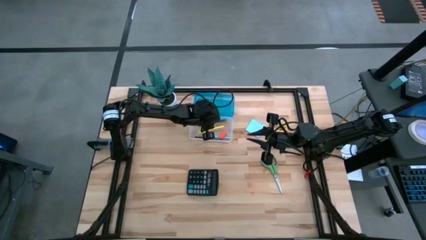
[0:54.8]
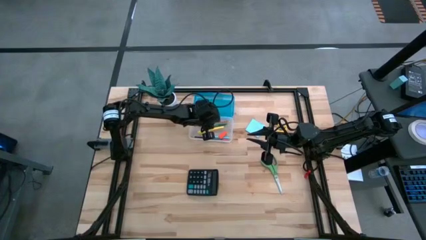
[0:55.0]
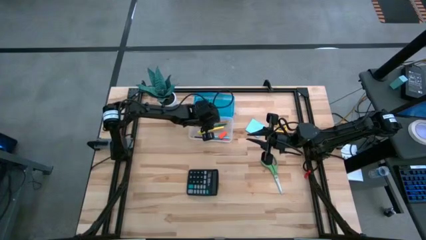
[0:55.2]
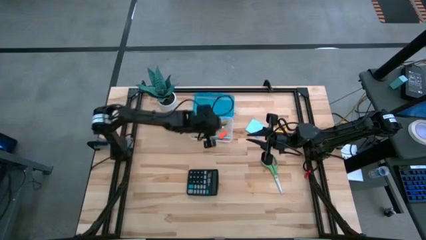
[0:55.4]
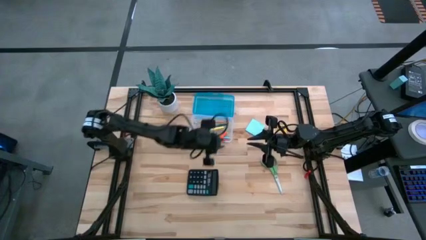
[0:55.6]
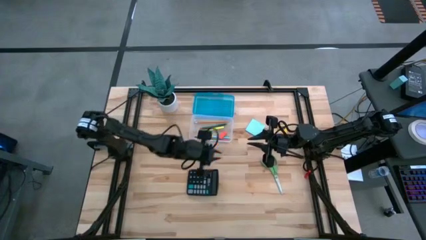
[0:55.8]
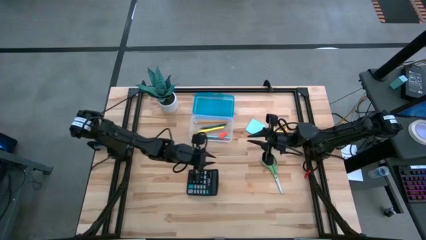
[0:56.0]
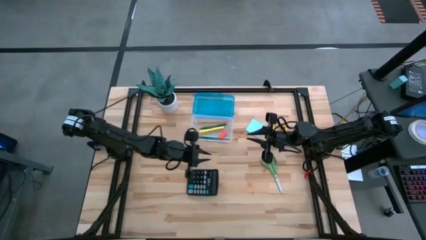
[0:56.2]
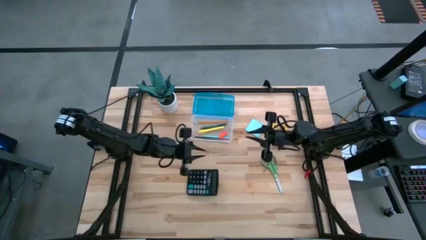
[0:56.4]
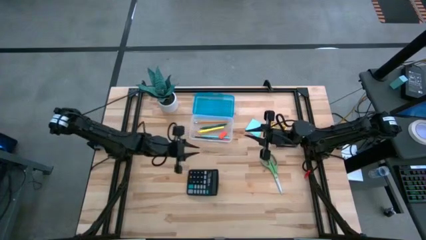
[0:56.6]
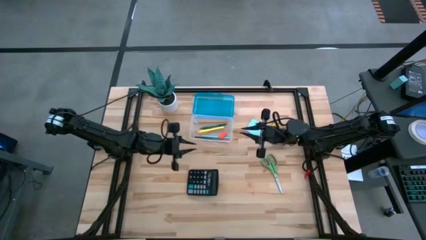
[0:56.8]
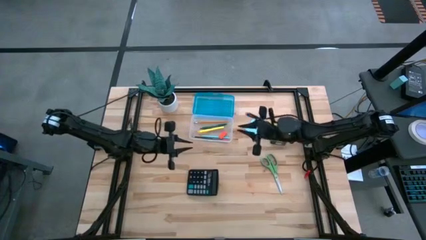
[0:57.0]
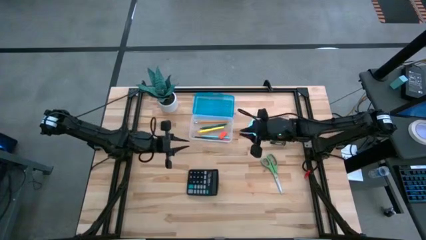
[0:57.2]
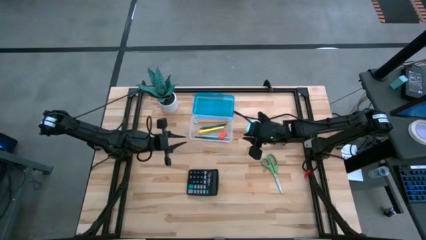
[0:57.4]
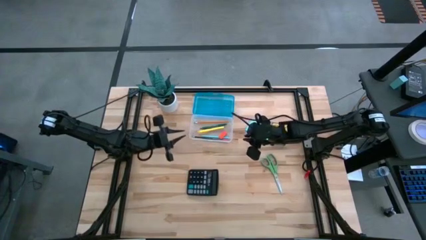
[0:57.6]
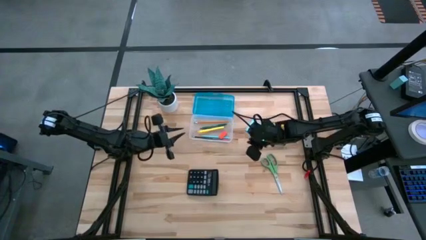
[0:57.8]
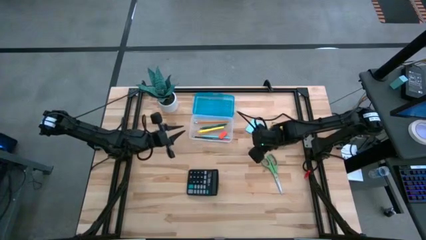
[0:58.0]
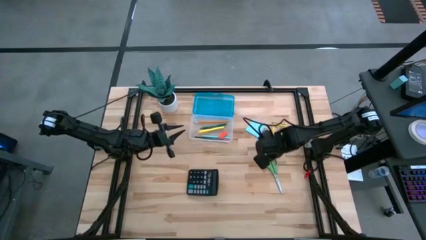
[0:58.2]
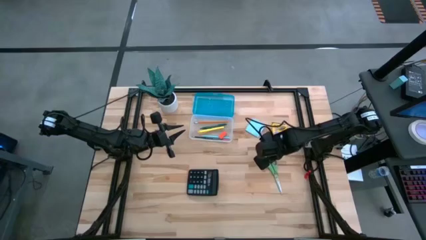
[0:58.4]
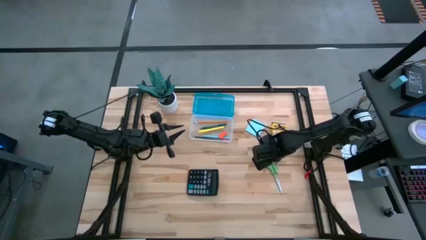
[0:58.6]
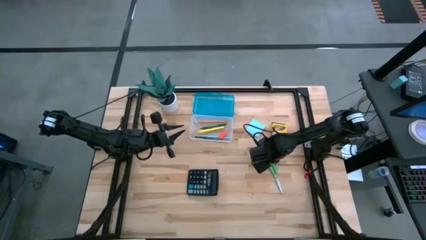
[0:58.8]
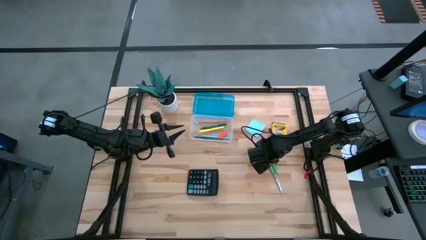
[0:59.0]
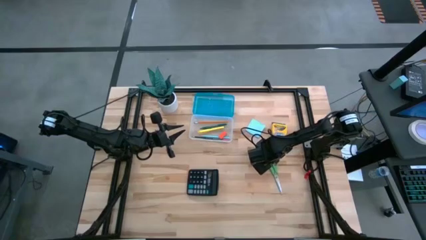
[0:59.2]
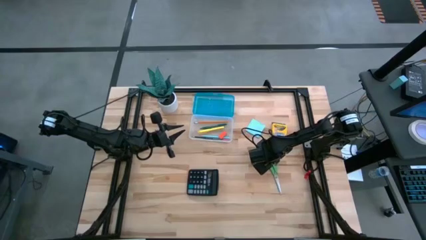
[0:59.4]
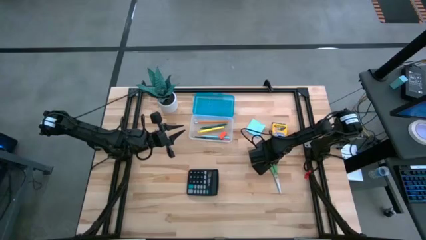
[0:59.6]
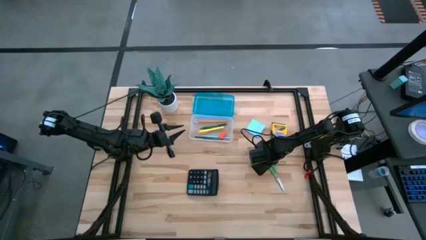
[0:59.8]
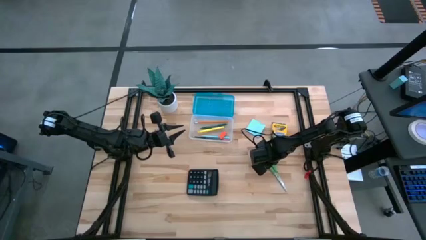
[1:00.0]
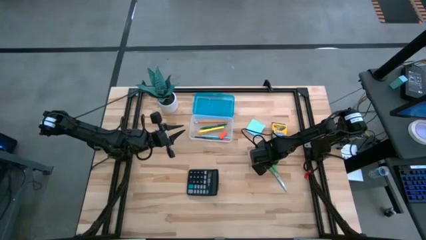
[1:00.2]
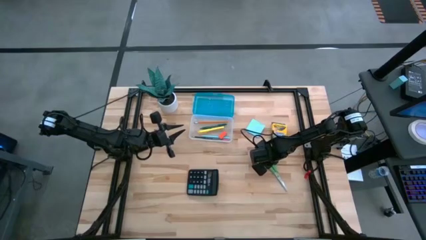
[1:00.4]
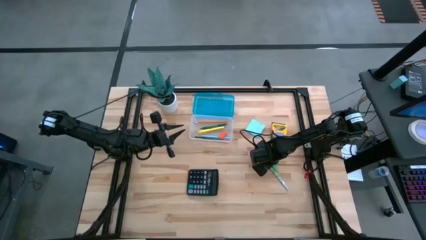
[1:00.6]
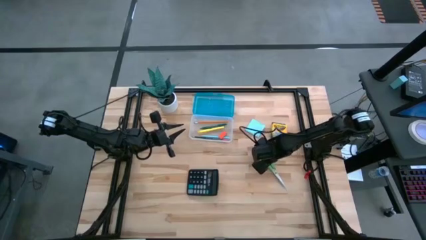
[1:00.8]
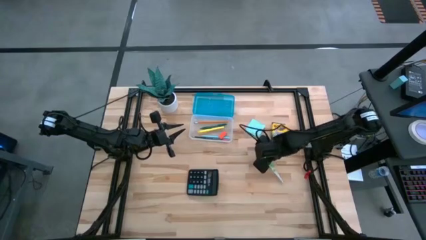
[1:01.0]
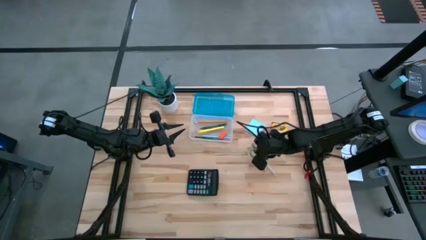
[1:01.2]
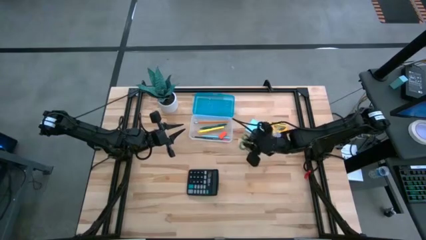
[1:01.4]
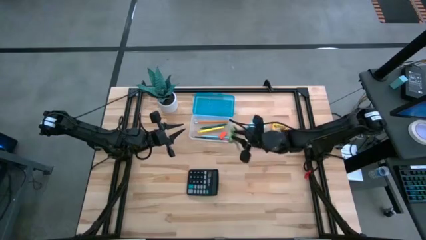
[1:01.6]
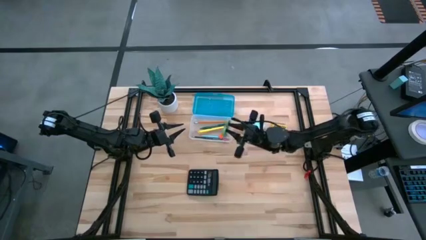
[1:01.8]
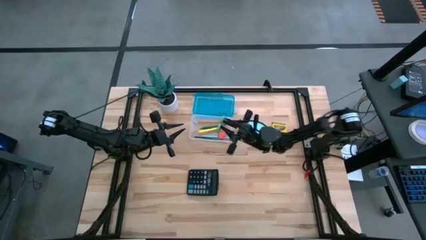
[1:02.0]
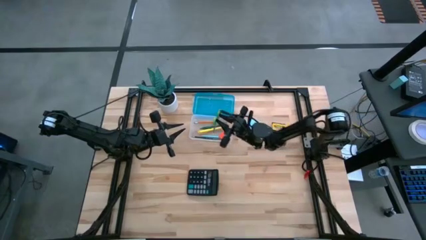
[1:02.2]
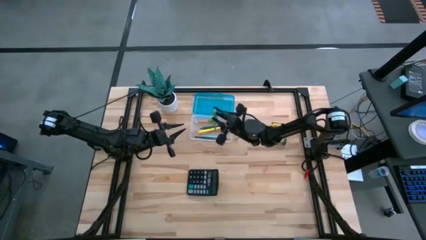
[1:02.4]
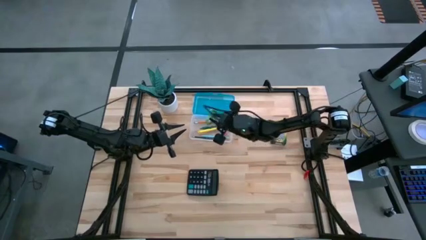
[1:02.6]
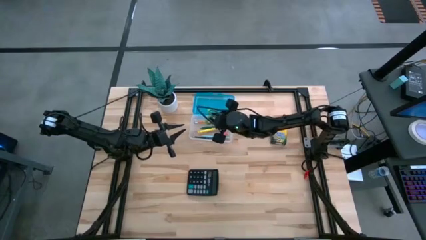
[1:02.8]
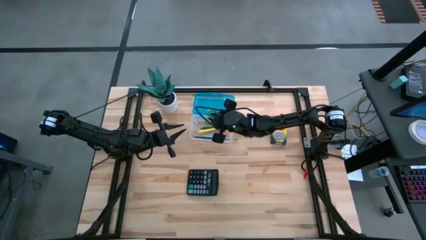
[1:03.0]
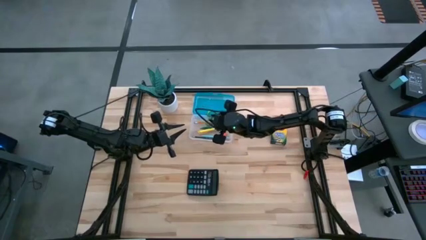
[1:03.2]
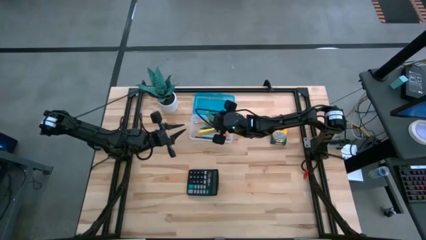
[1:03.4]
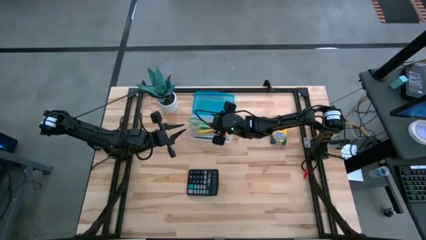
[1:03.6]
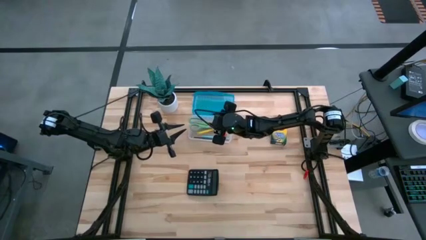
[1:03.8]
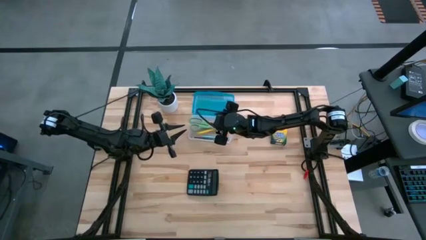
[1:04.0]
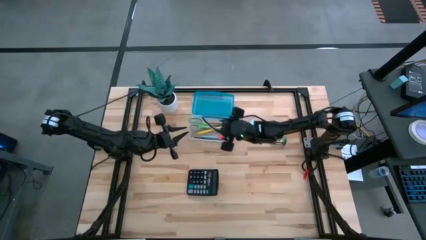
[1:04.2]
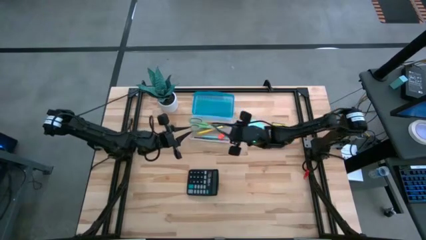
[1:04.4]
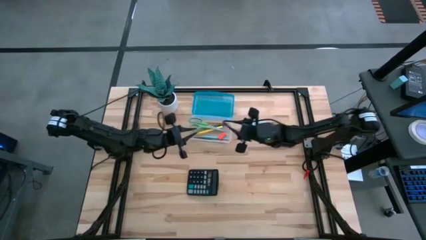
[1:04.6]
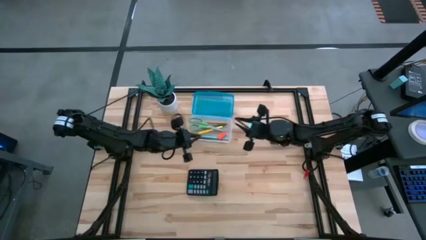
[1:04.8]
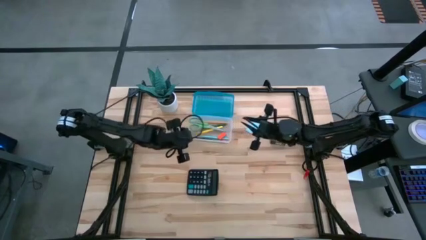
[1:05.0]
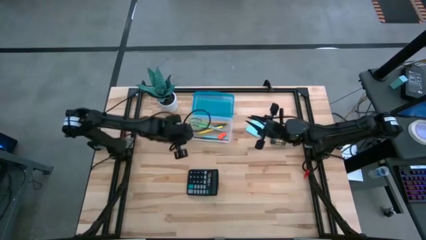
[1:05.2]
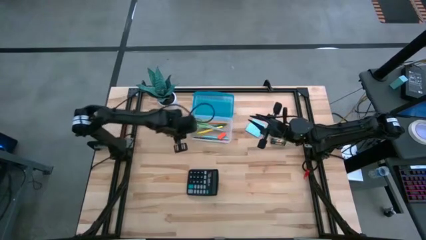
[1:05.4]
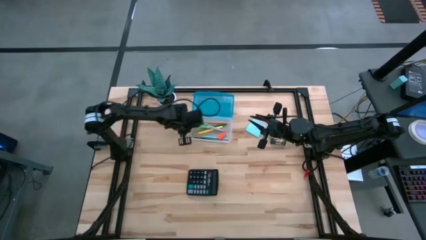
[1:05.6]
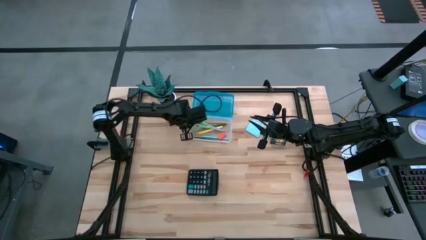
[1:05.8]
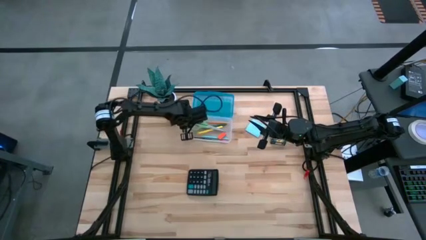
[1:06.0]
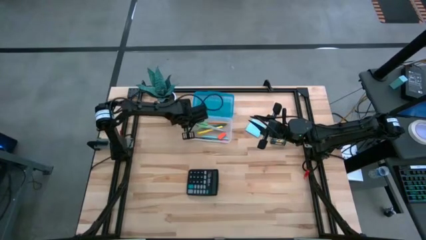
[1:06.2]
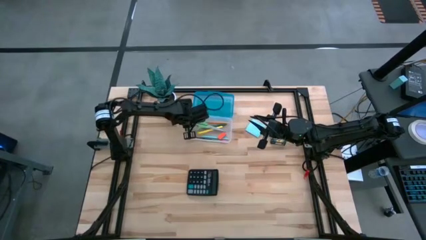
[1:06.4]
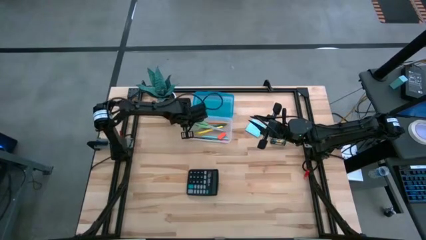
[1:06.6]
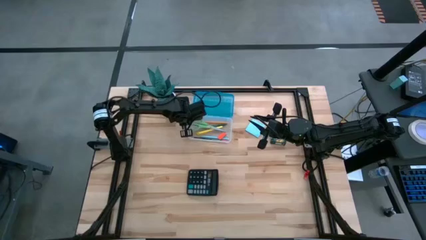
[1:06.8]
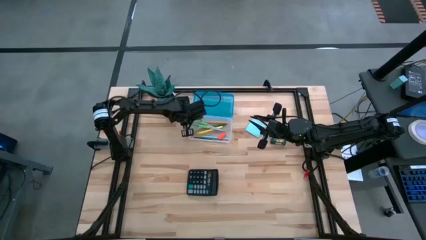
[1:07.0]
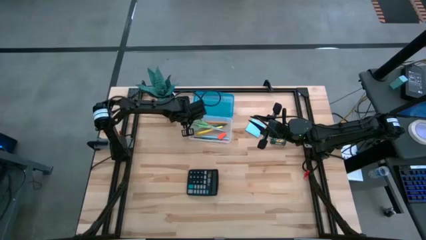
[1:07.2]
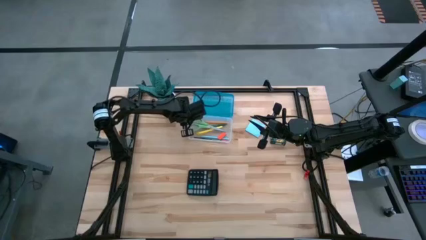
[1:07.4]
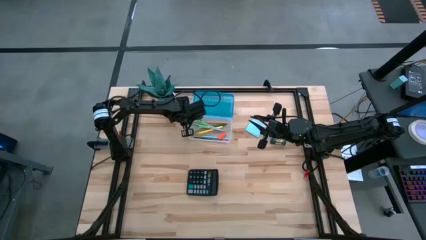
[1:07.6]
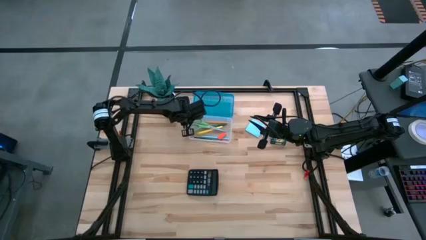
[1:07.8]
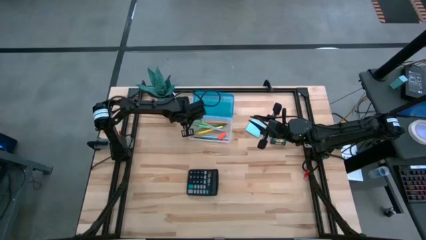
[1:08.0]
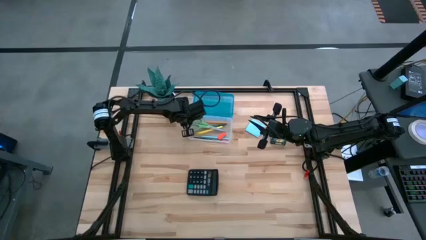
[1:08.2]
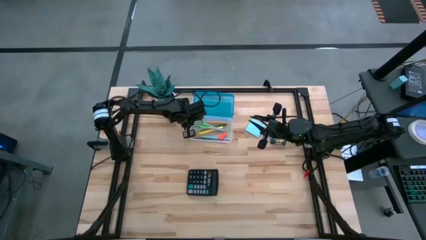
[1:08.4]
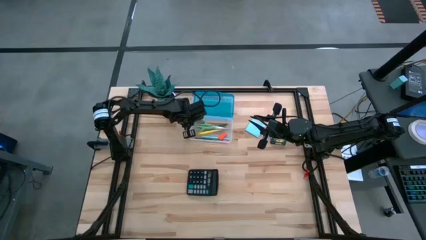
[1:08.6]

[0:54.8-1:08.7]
Task: Pack school essentials
Put the green scissors into the supply box

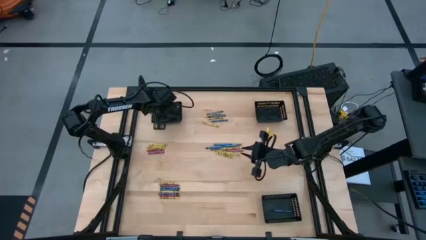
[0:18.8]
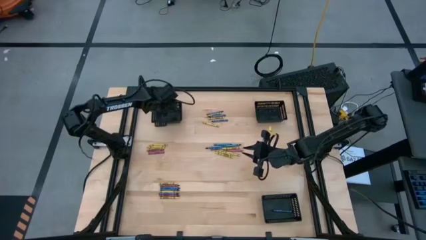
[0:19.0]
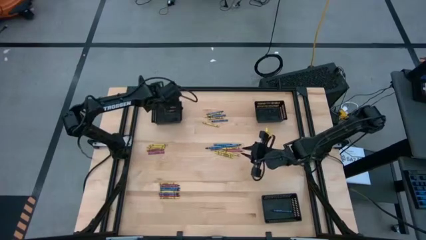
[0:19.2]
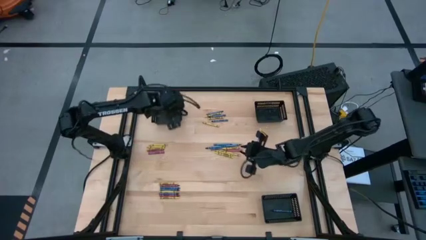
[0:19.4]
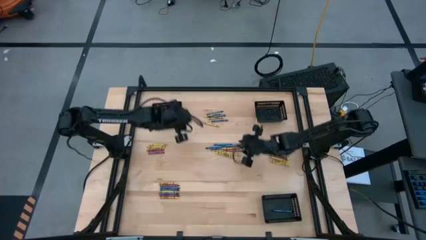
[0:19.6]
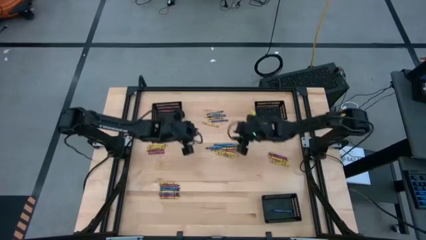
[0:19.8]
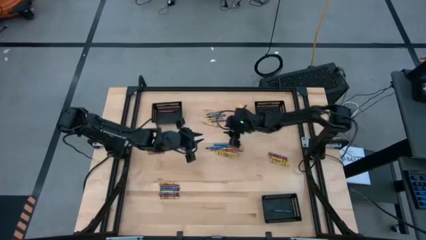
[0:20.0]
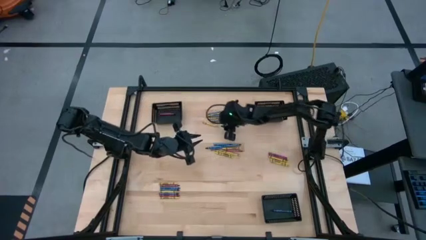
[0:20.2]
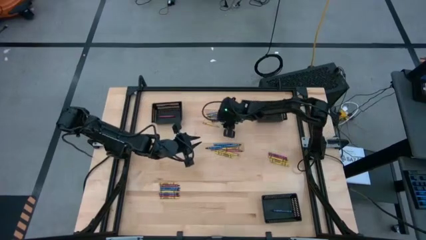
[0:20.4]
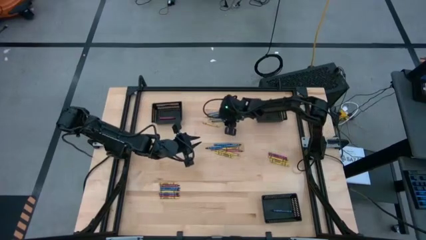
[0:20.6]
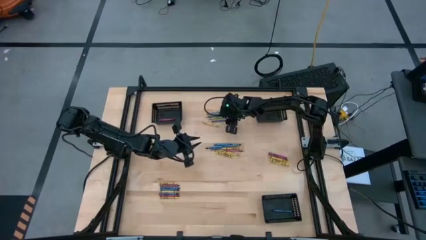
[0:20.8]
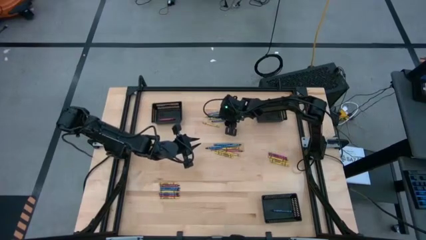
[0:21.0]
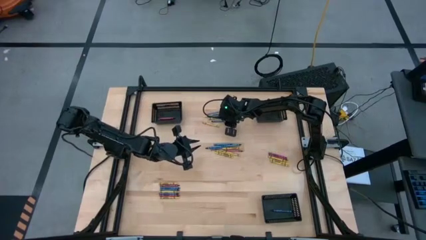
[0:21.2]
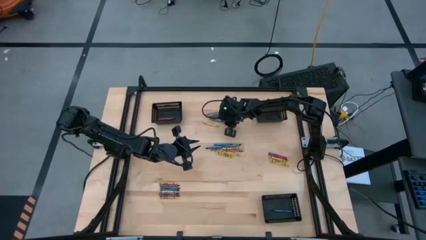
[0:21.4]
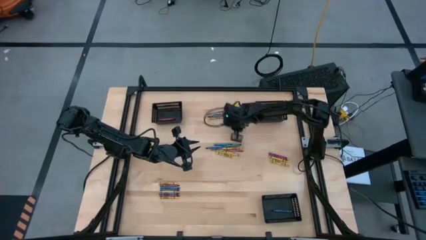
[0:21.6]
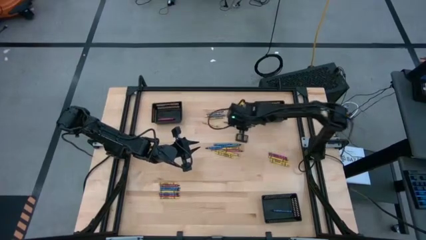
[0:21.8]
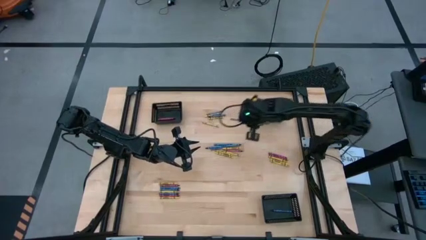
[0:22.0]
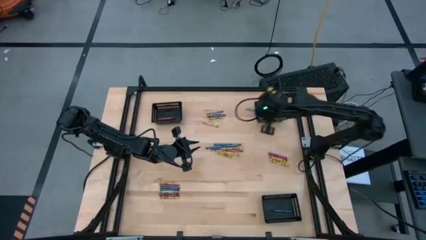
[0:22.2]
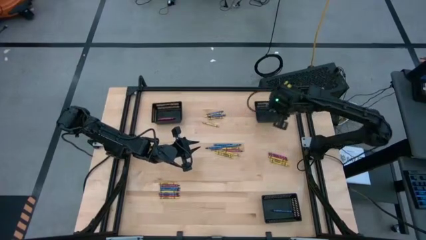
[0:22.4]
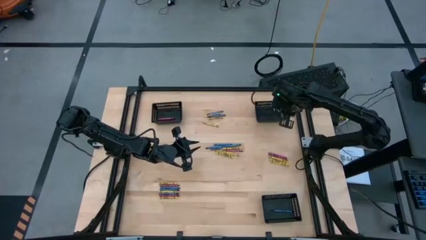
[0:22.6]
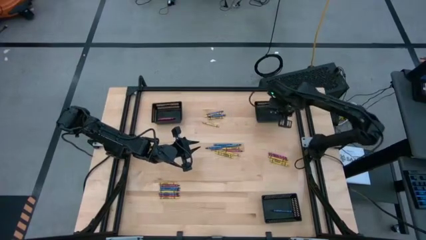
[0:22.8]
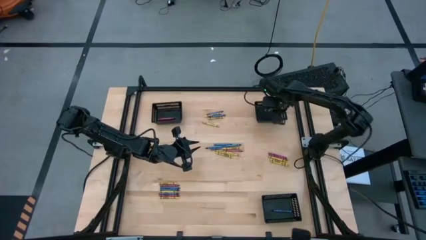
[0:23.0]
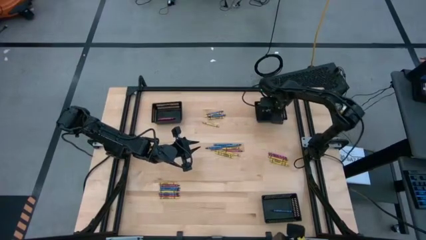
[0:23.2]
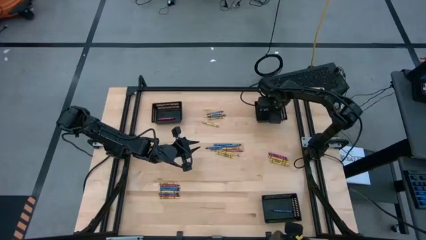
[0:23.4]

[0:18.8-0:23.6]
Task: Sort crayons
Put the blue crayon into the top right black bin
